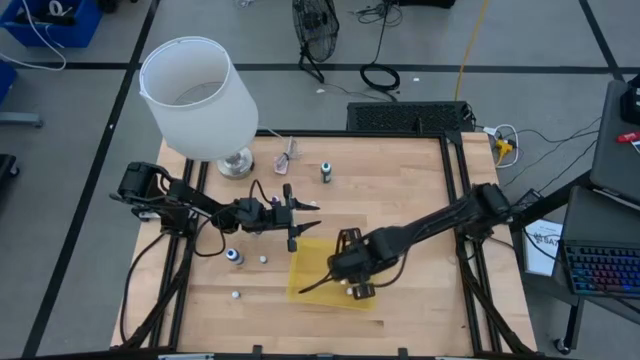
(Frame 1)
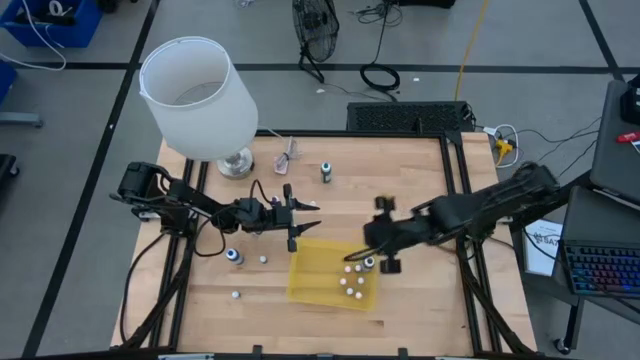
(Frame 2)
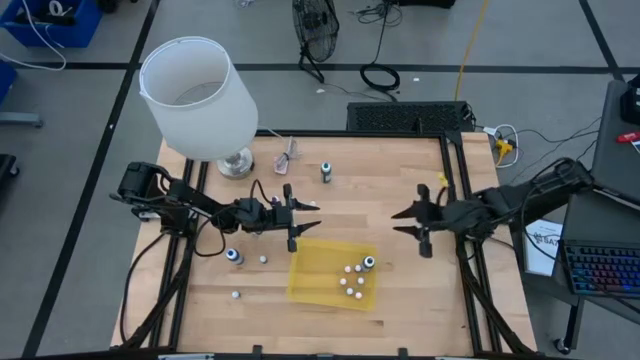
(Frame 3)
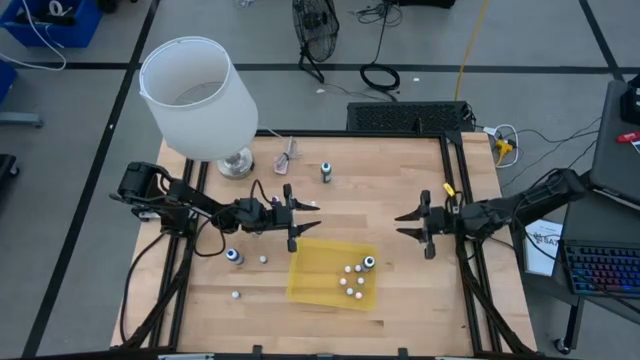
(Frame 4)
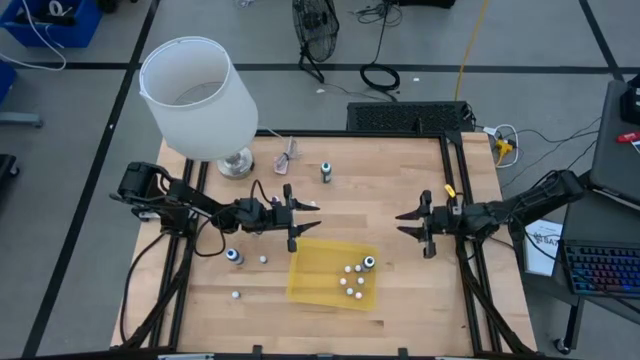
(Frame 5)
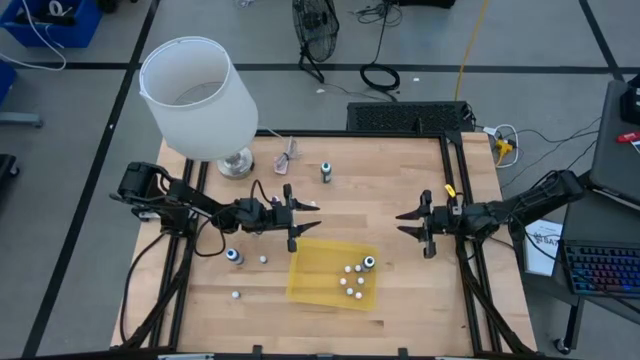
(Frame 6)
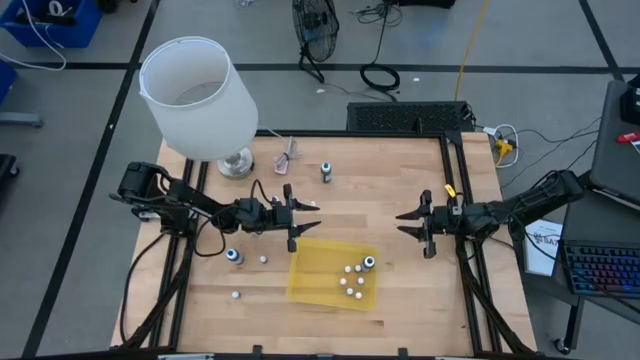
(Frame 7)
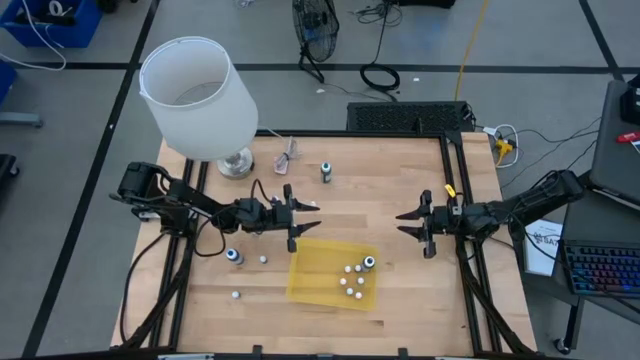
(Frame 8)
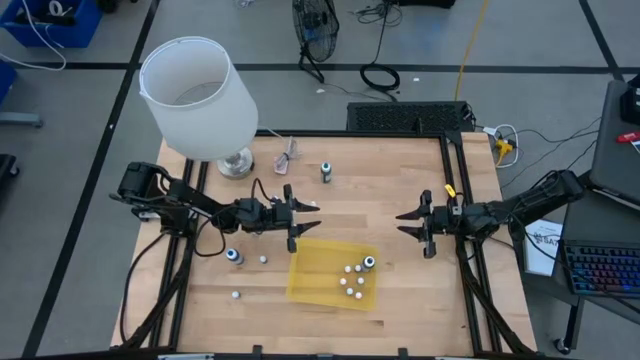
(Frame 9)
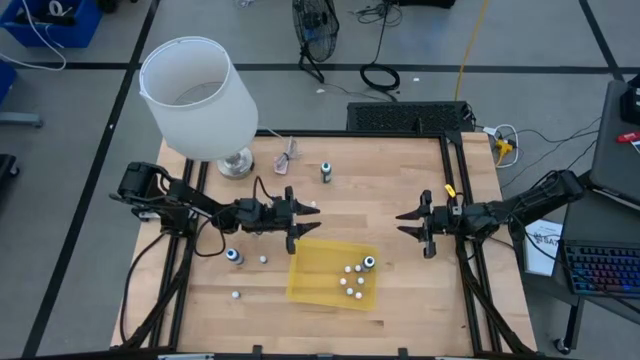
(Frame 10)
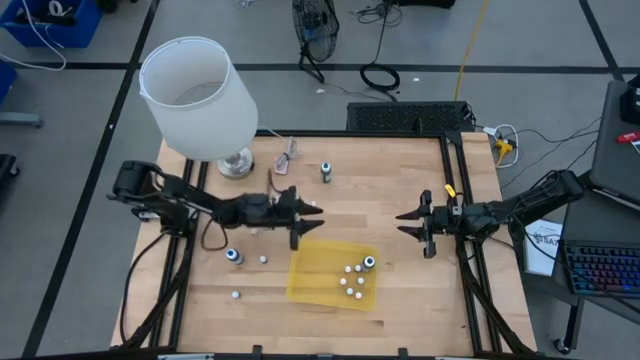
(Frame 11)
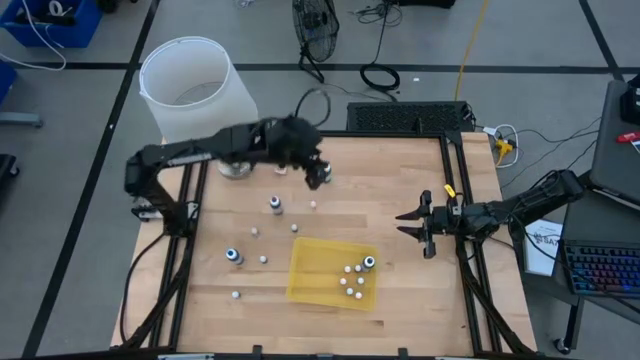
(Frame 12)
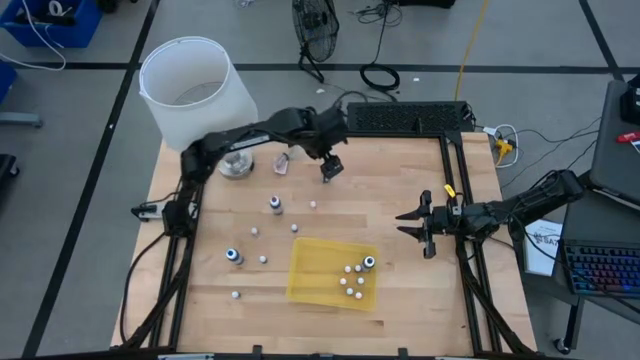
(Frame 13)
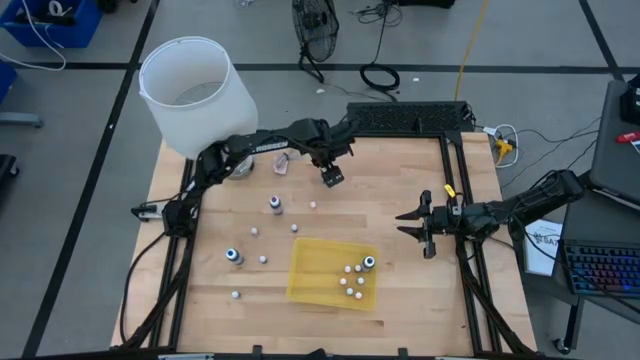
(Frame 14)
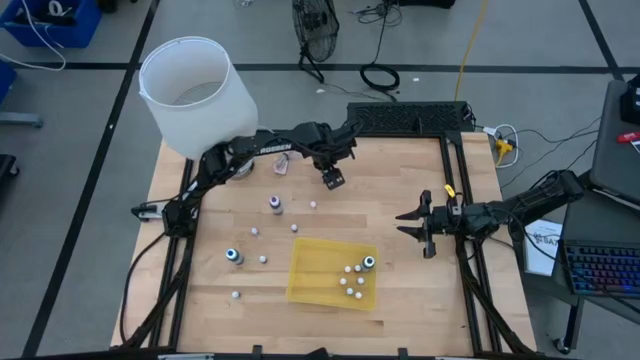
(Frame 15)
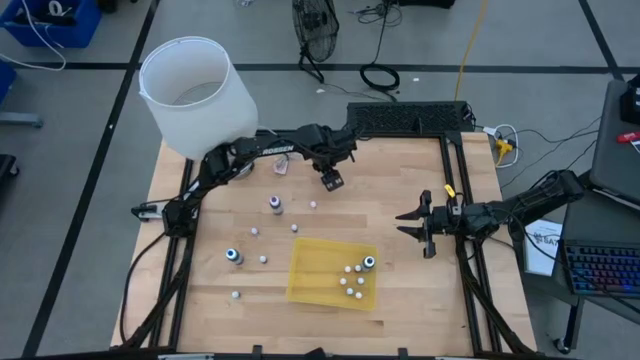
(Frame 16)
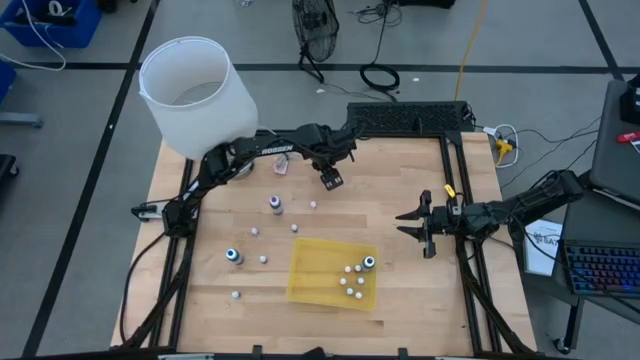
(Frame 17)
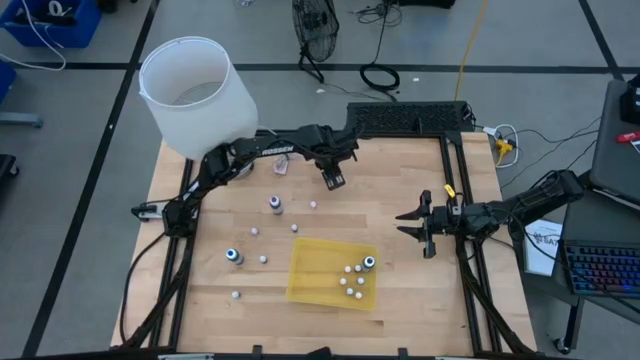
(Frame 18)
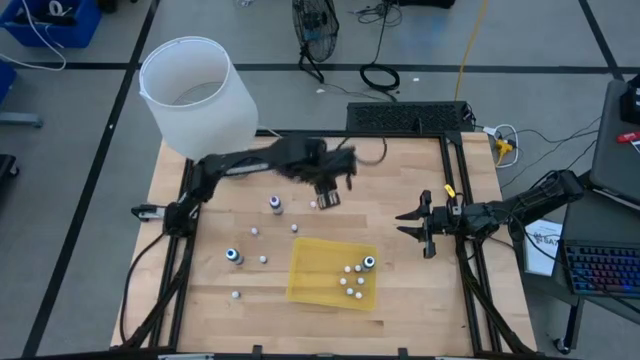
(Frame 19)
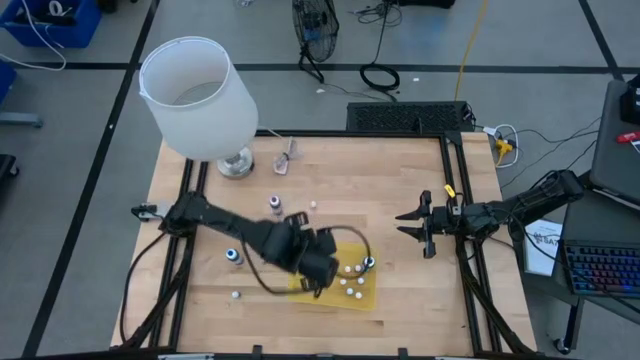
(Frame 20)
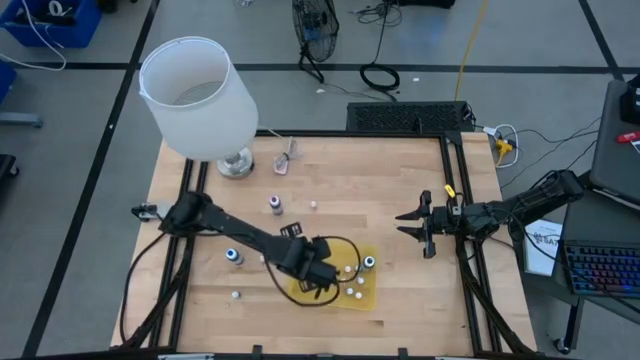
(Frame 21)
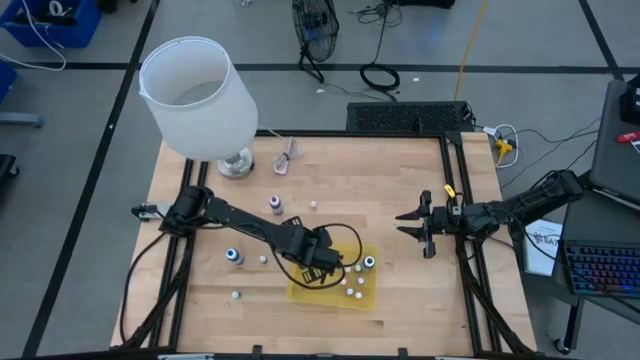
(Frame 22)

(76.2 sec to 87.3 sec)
Task: Pick & Place food coloring
Put the large green food coloring bottle into the yellow container

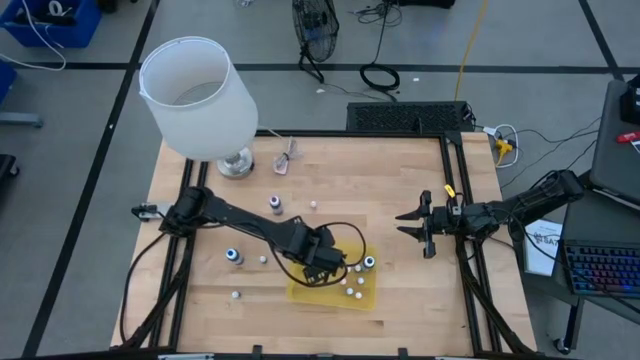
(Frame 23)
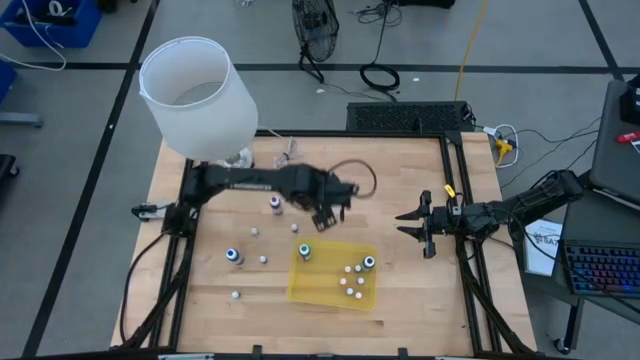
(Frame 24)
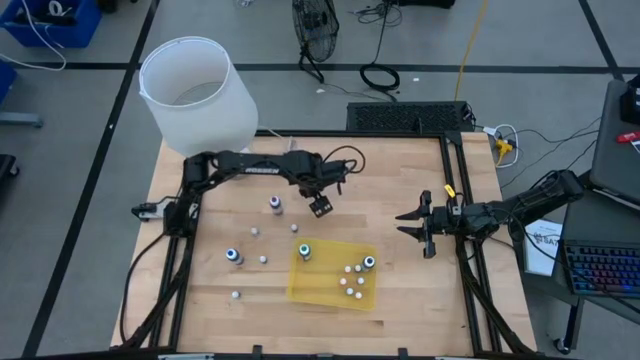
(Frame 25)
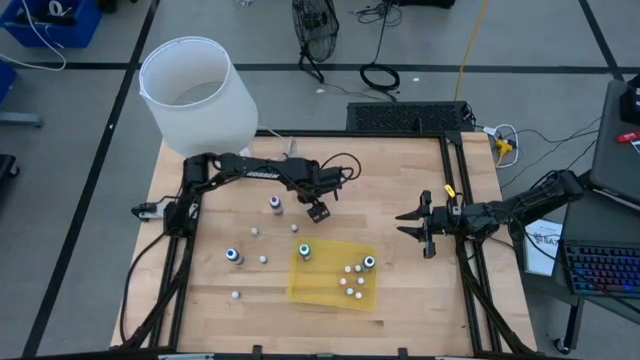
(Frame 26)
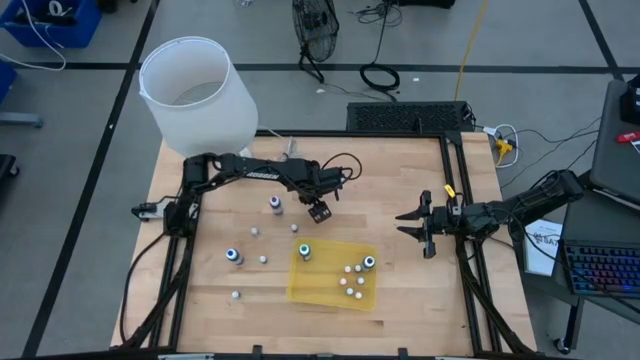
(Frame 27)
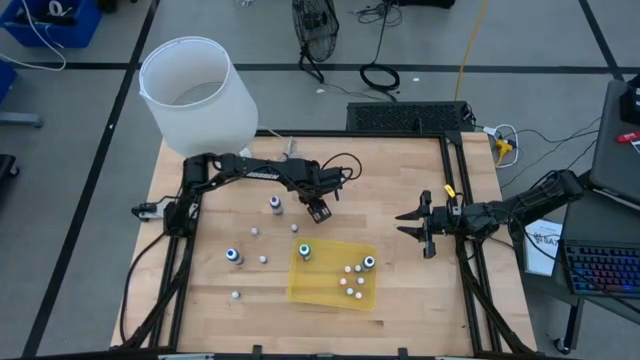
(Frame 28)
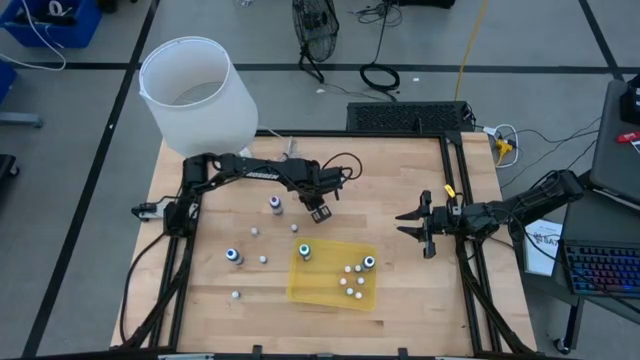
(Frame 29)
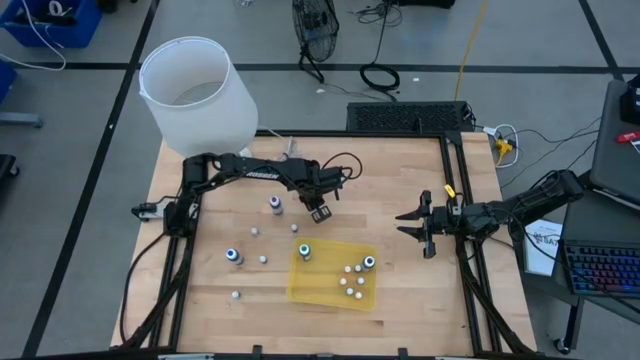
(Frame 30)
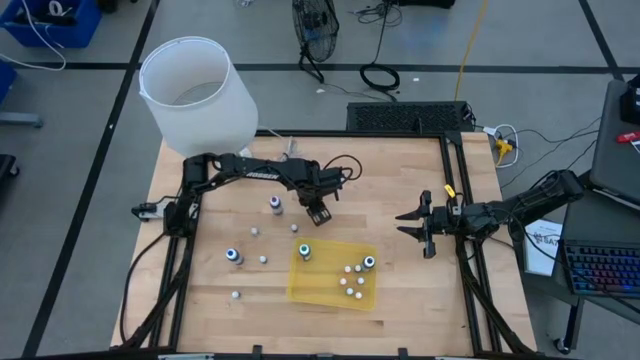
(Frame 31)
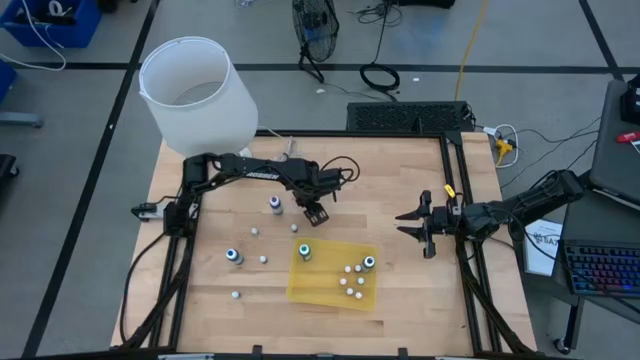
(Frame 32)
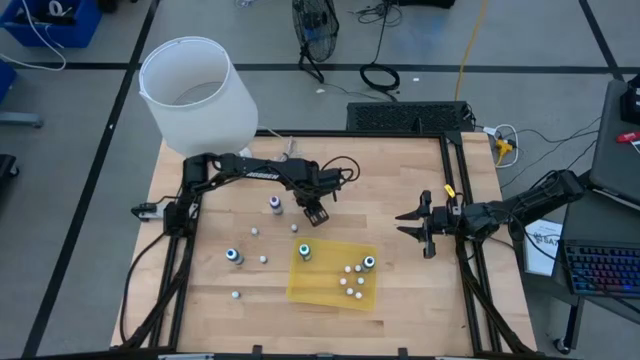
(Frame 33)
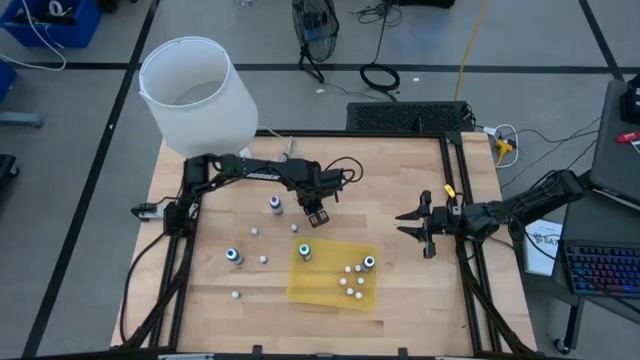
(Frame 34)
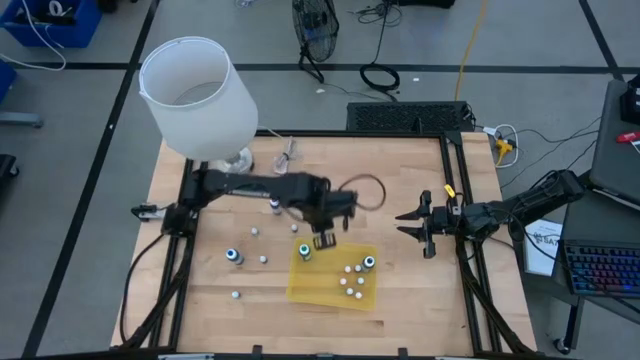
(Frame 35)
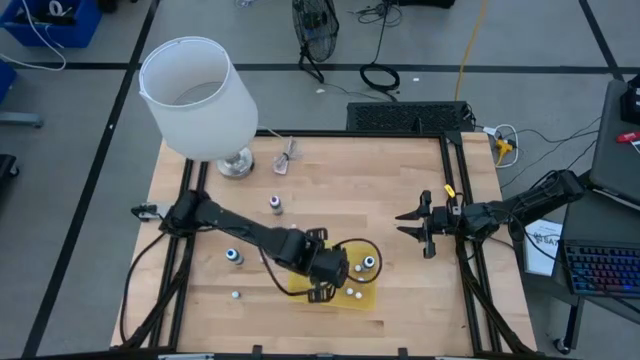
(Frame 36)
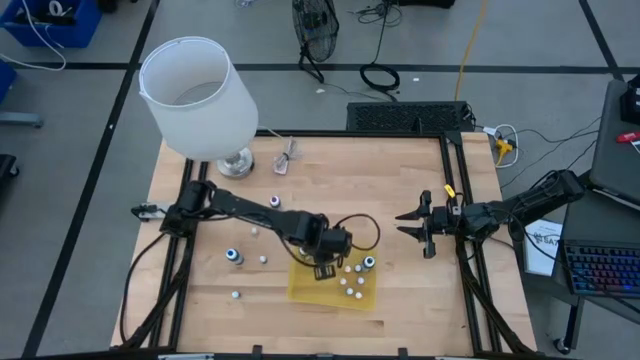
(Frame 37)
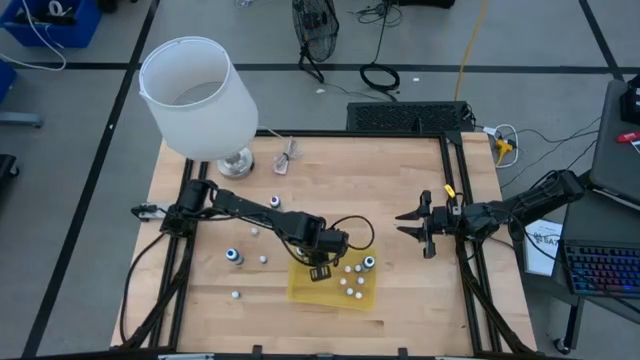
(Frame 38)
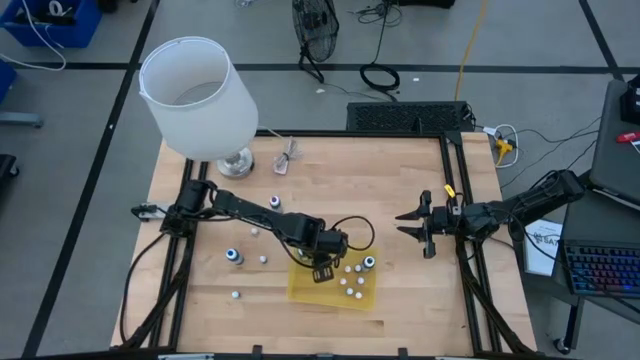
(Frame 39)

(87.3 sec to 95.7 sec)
Put the small orange food coloring bottle into the yellow container

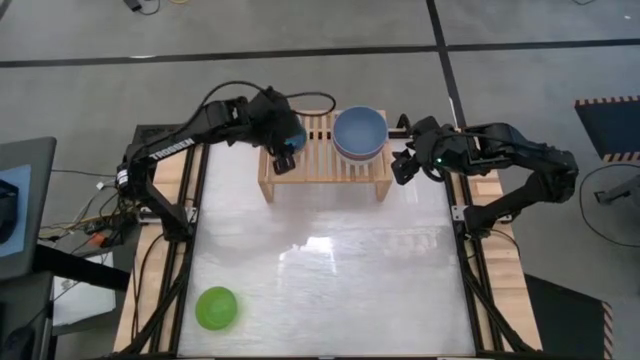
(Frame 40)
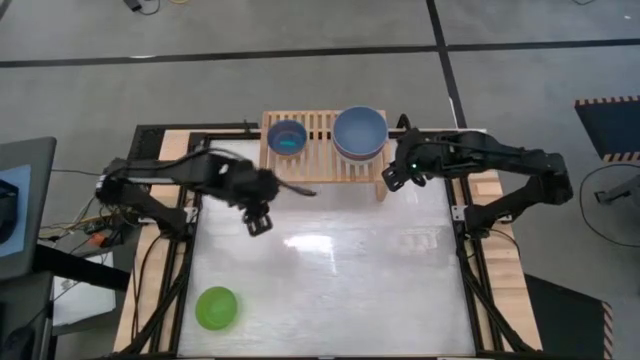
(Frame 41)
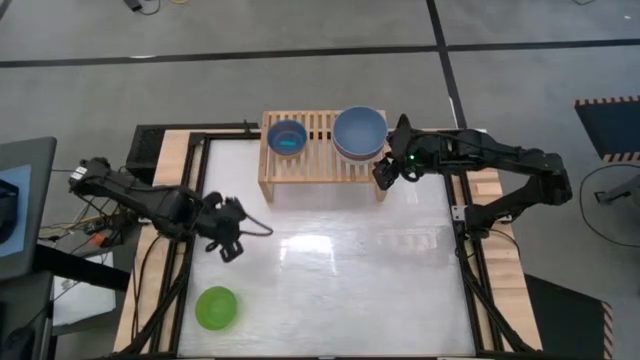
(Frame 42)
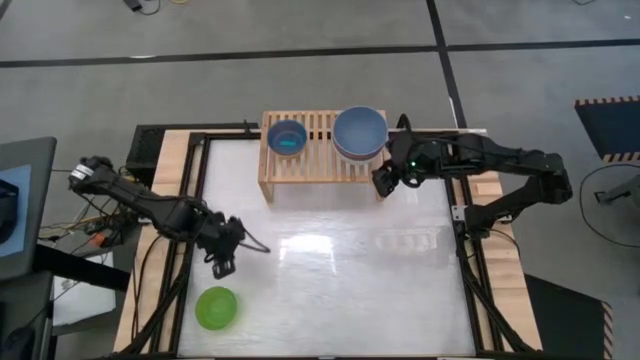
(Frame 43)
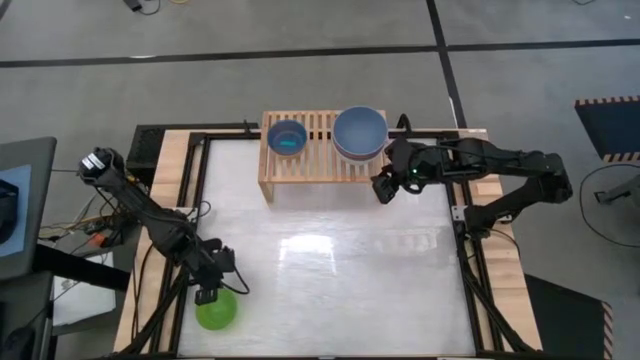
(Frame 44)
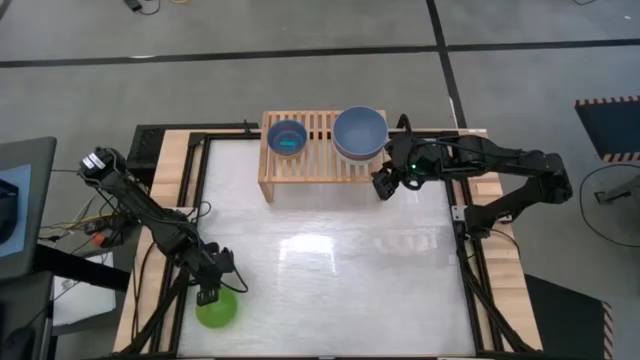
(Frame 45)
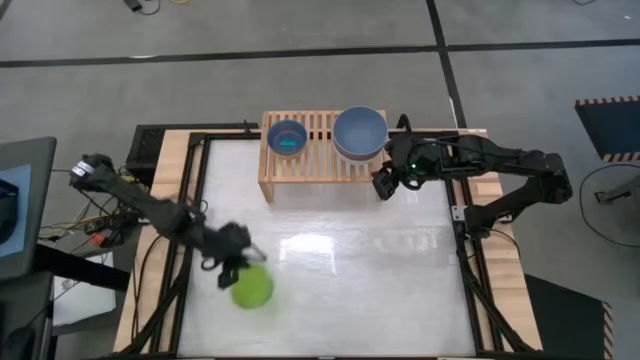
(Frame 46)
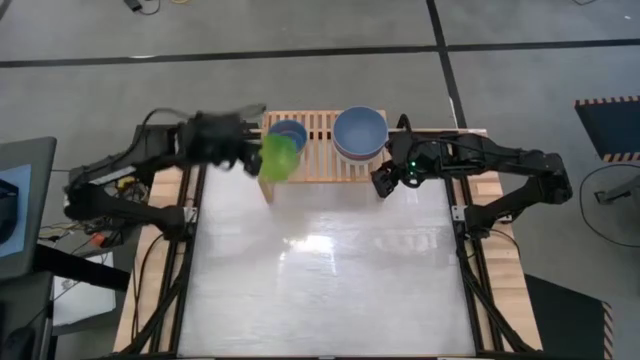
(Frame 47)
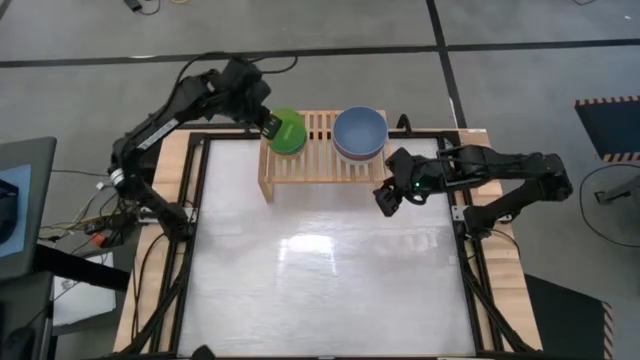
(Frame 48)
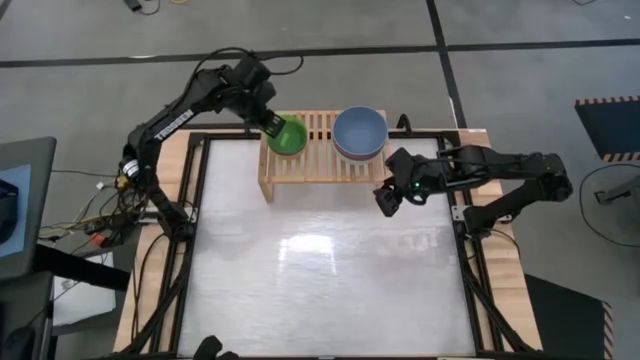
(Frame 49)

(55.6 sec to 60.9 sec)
Task: Place and stack bowls onto a shelf
Stack the light green bowl on top of the light blue bowl on the shelf
